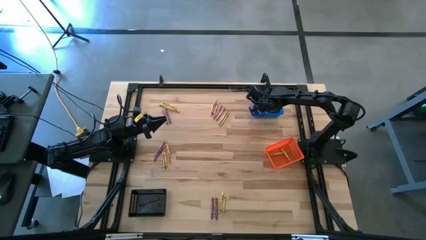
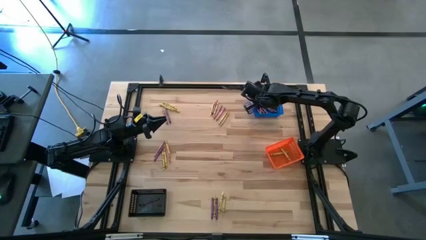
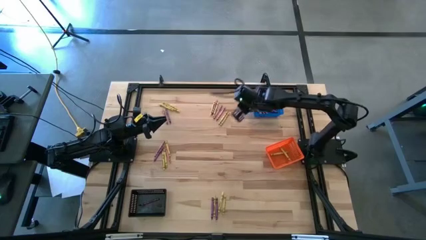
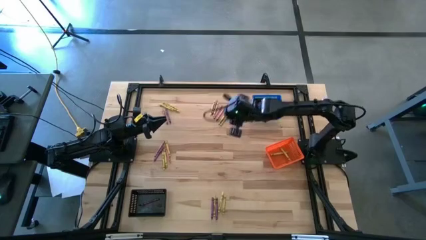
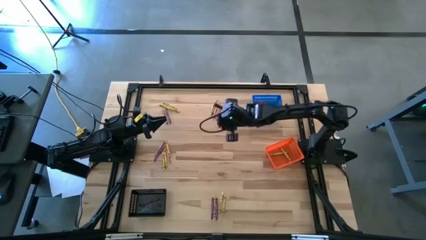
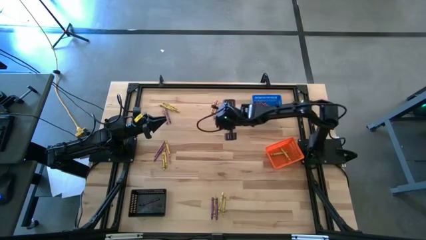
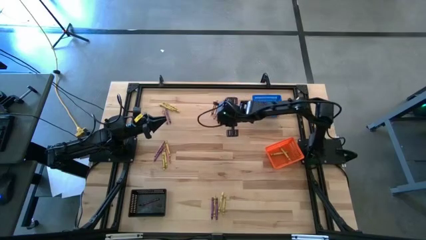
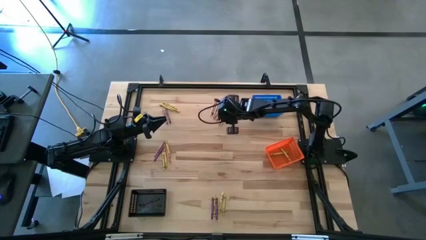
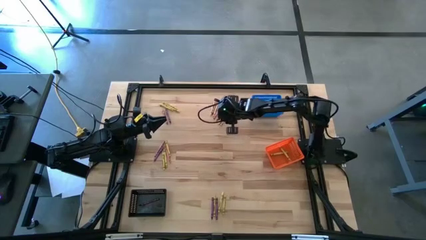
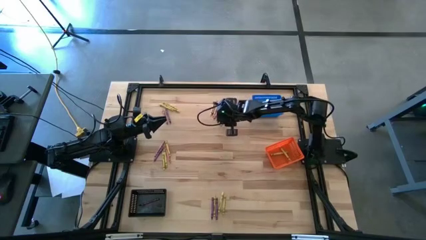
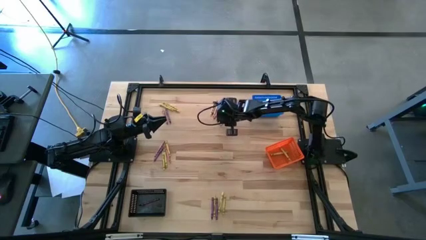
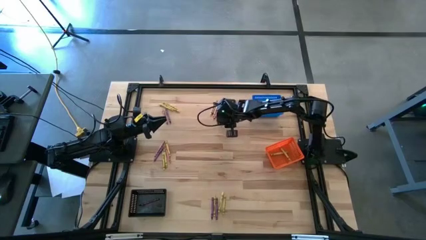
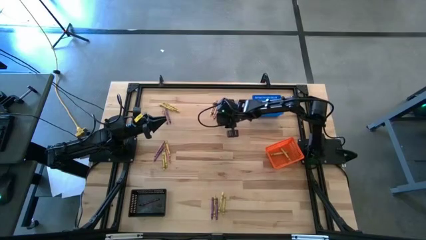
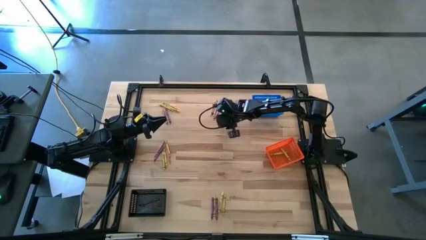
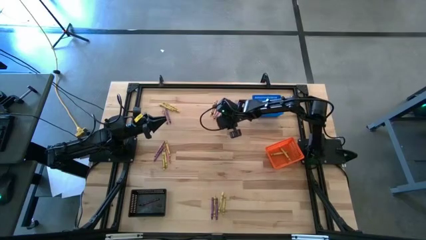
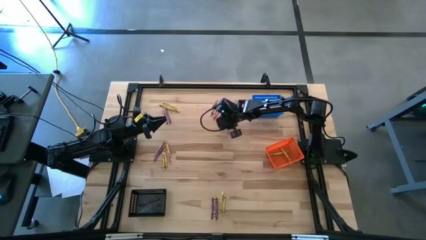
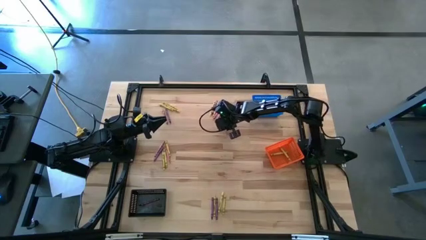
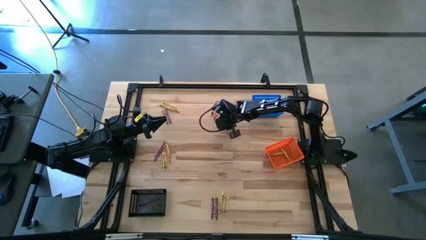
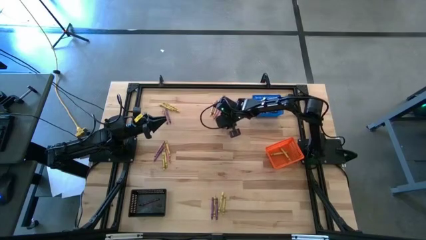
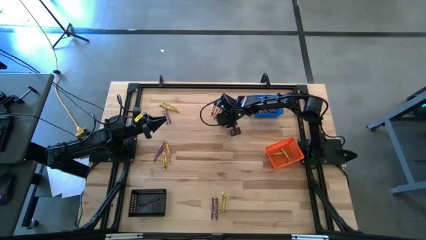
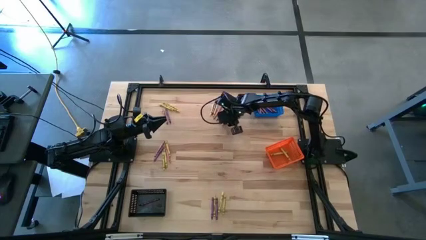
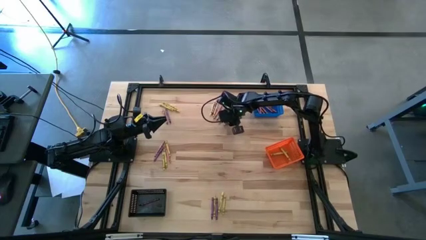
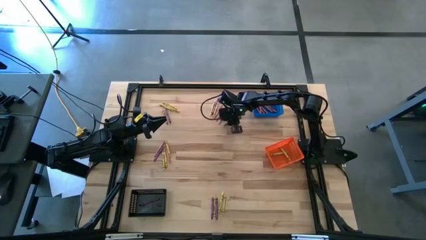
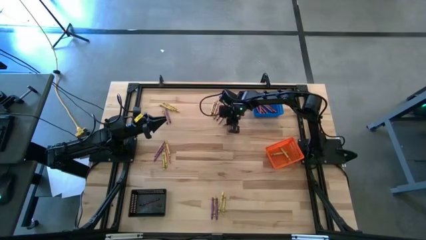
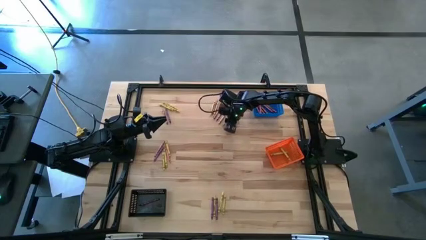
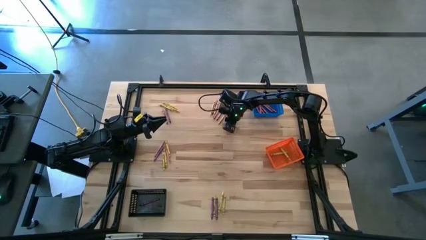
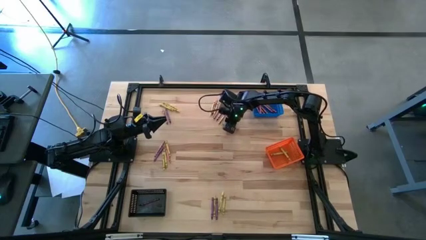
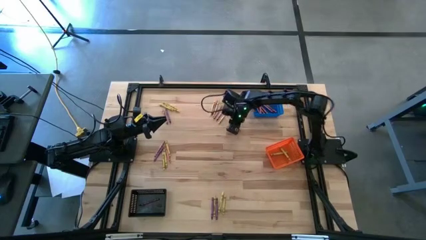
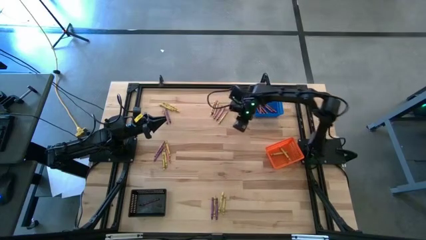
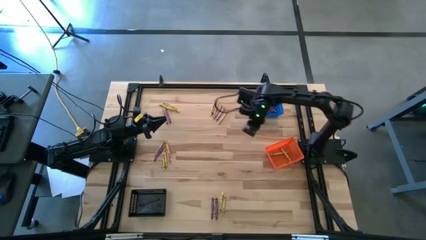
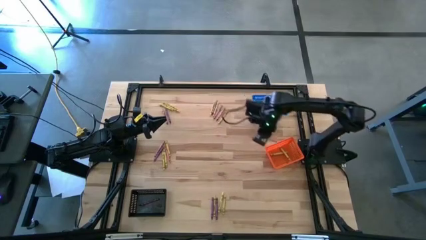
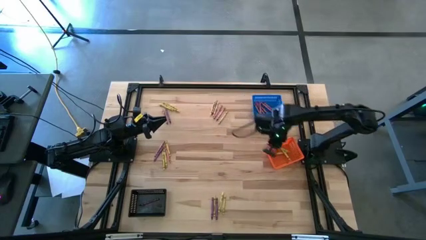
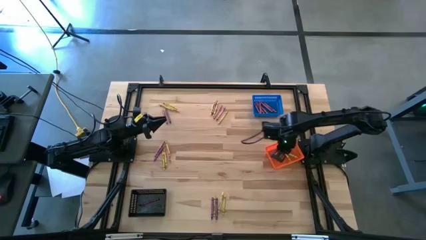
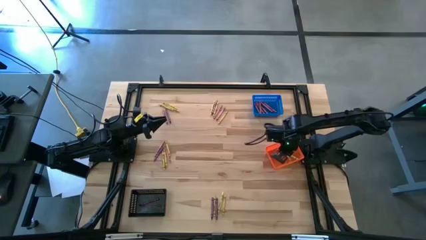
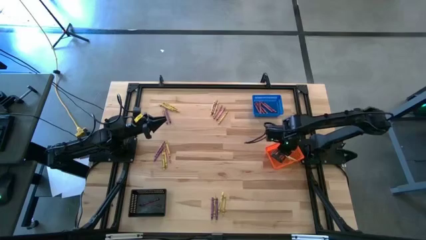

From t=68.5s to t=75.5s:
Task: Sort crayons
Put the yellow crayon into the orange basket

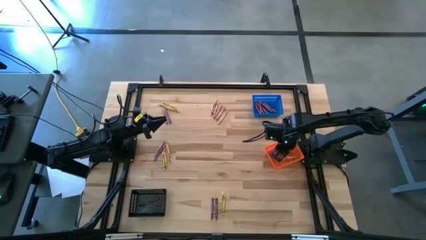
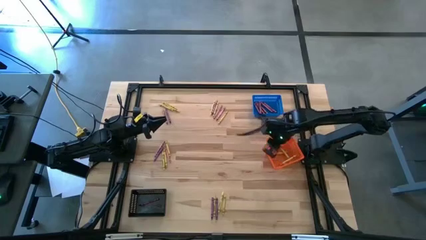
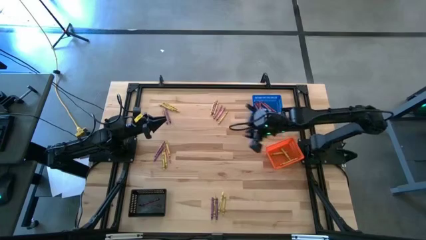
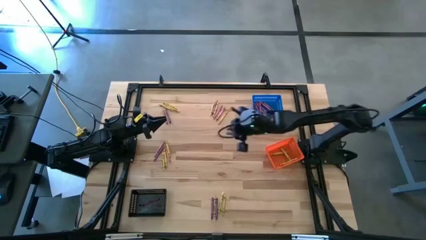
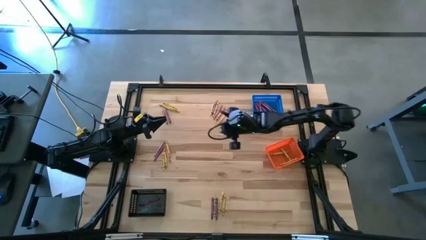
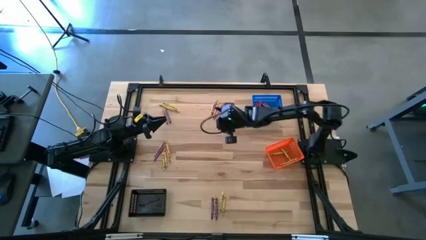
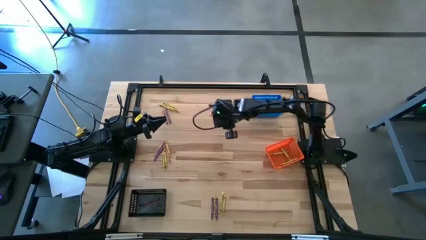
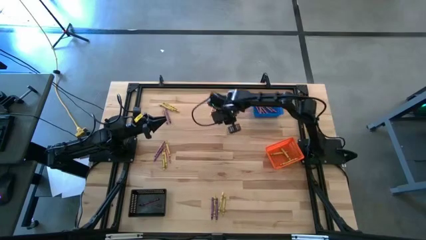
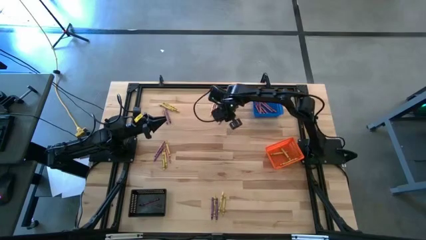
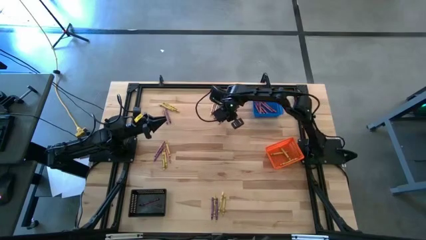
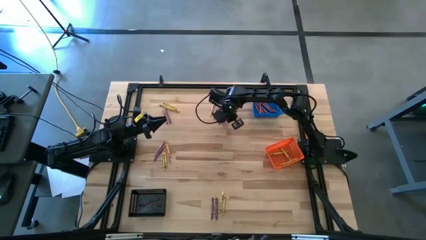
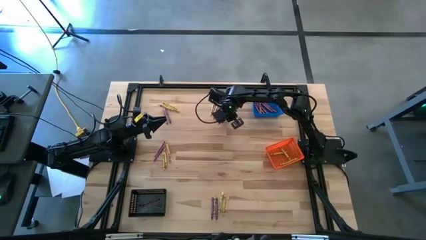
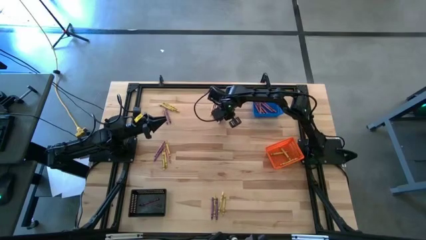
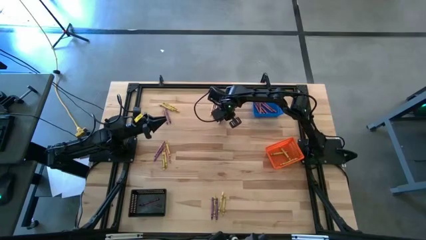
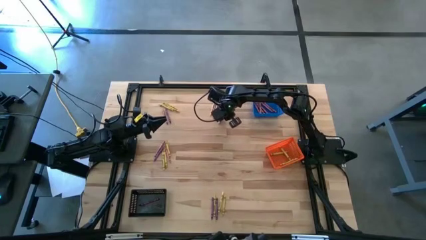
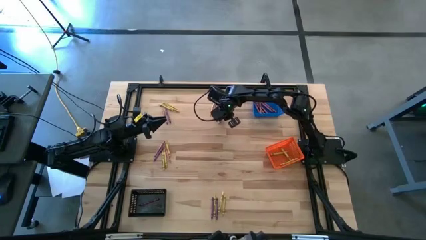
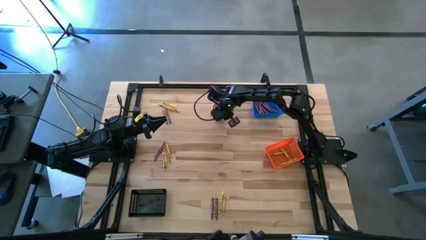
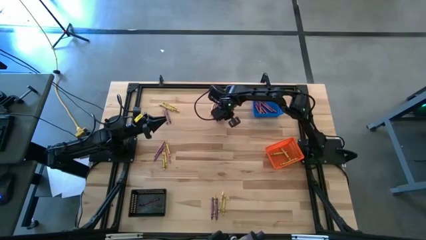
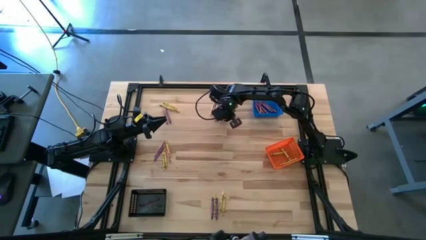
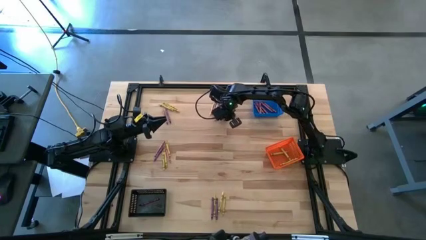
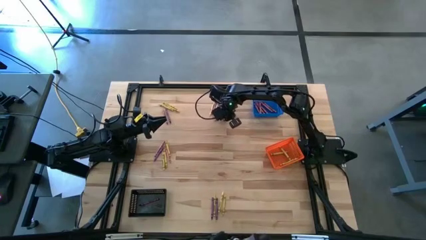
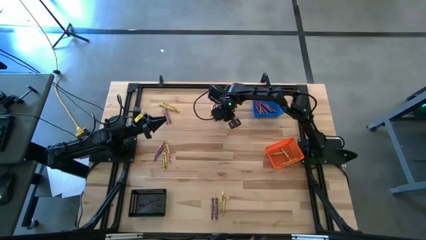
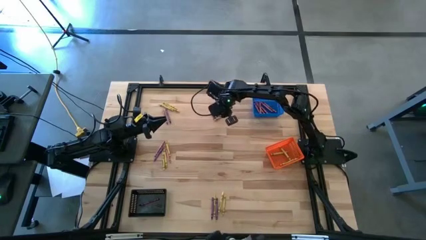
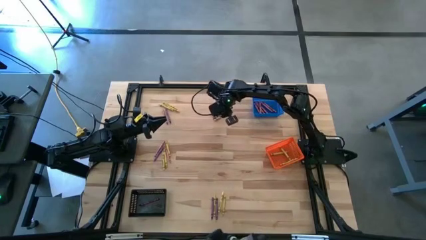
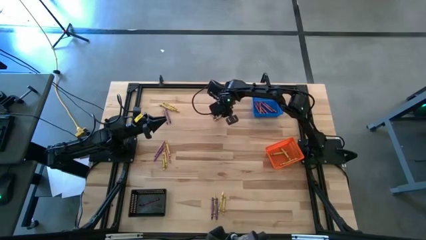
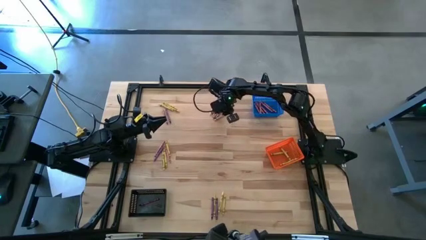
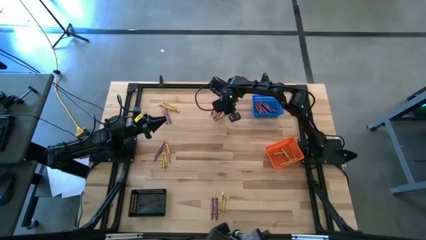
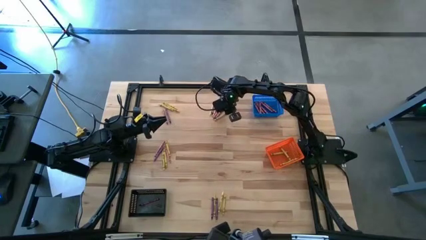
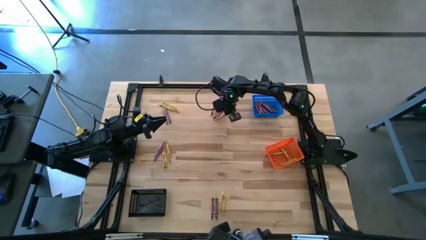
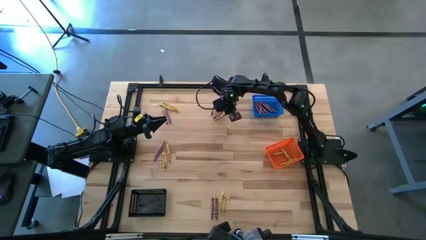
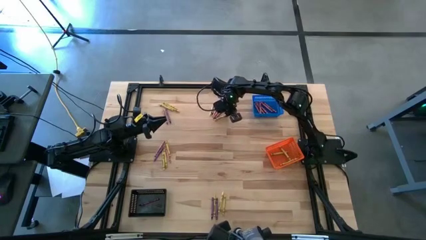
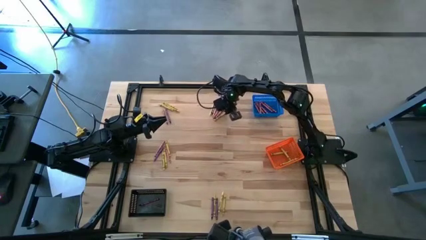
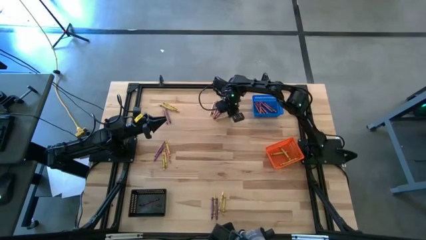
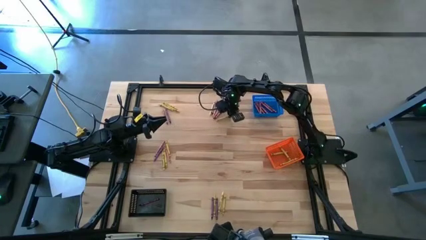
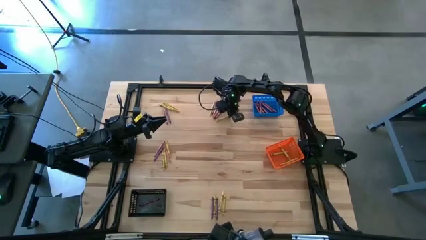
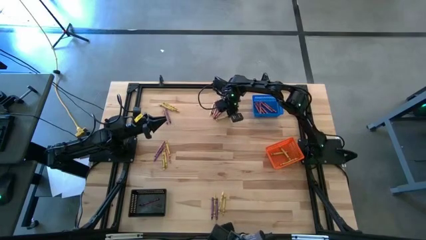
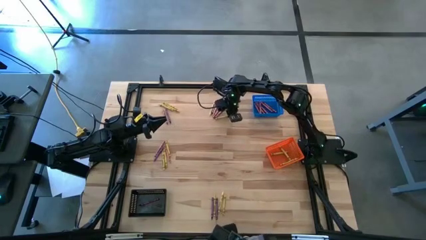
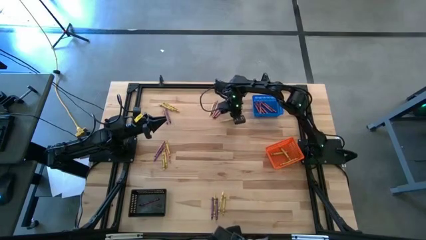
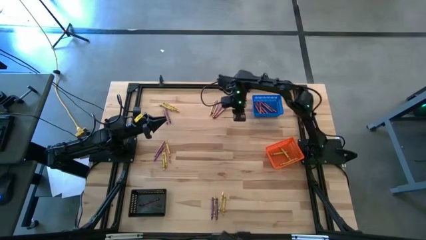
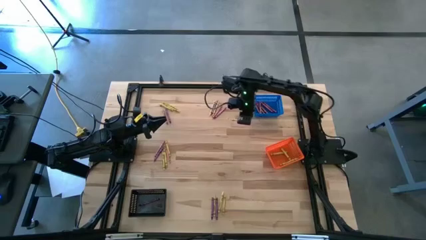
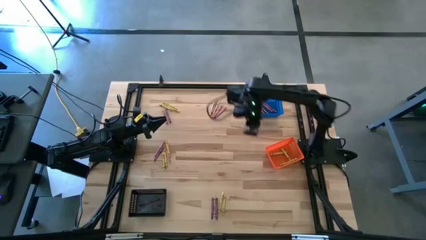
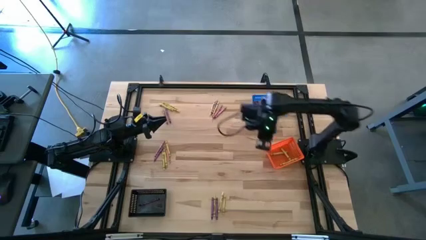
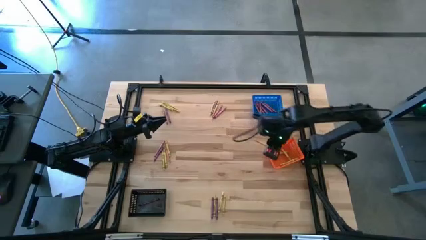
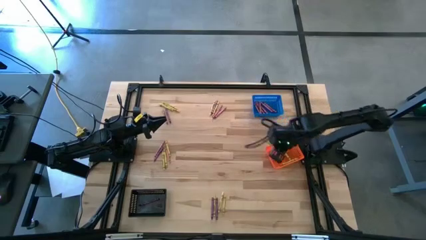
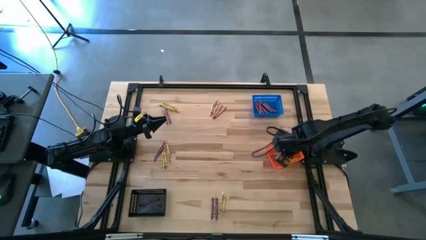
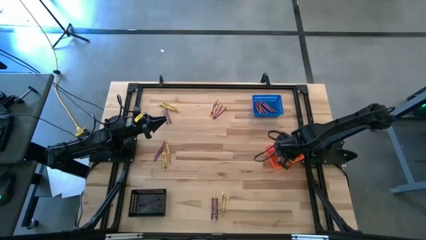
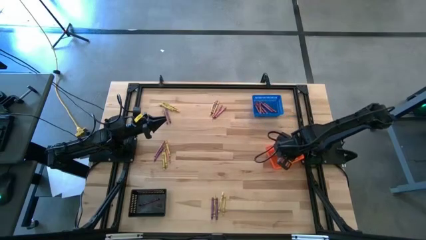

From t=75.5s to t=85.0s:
Put the yellow crayon into the orange basket
